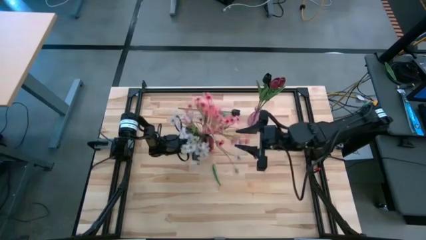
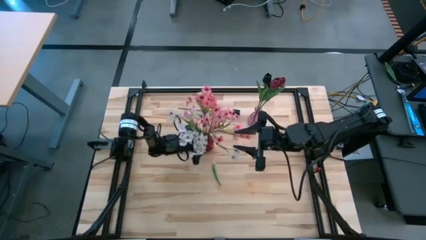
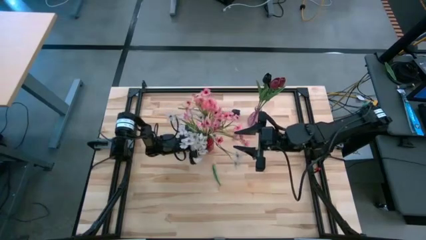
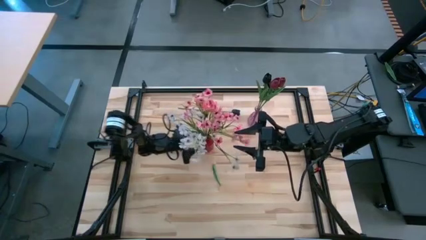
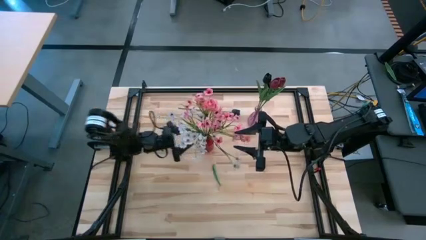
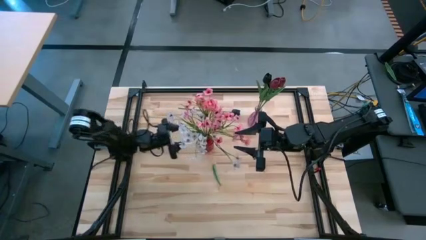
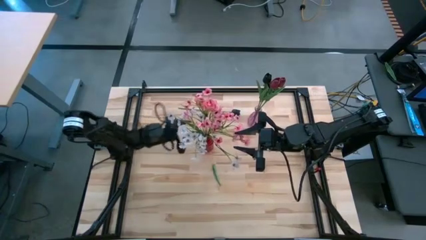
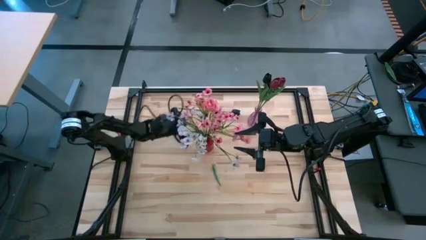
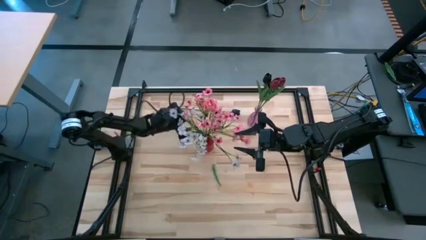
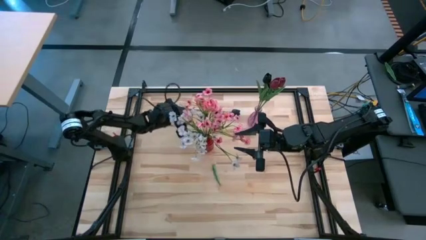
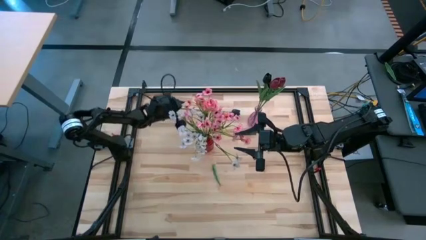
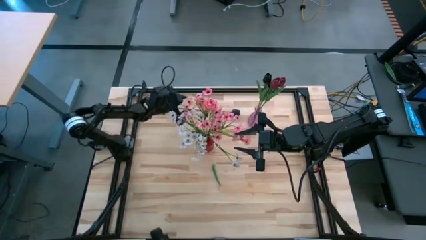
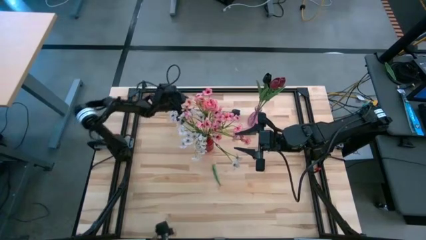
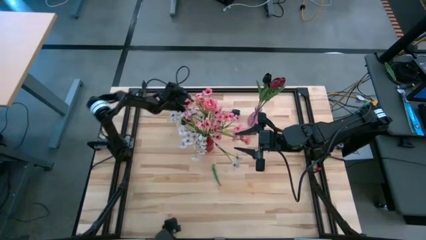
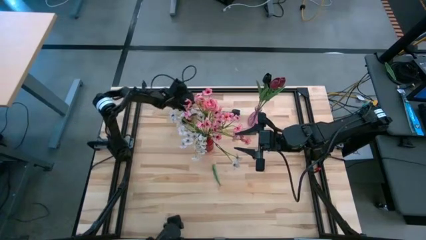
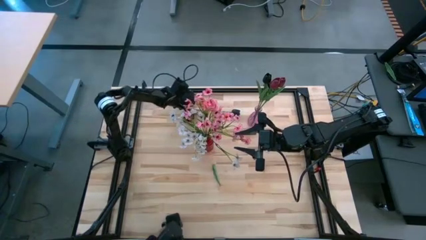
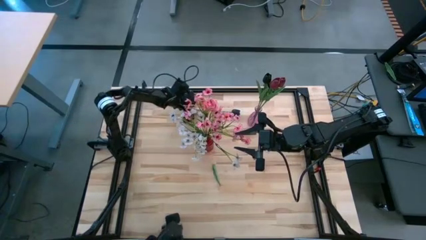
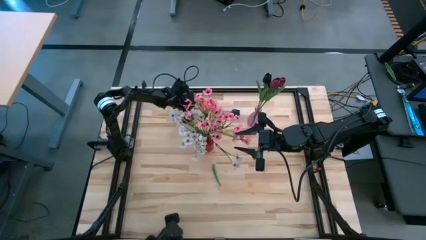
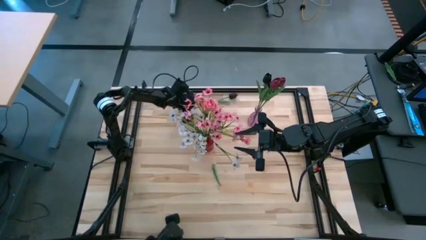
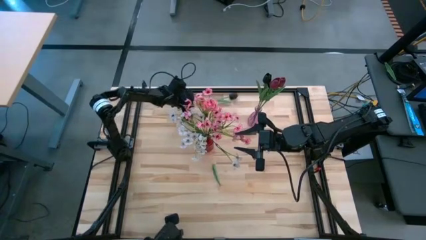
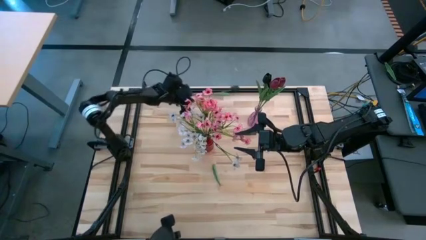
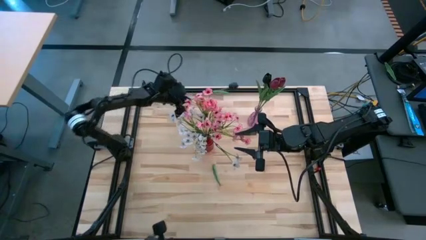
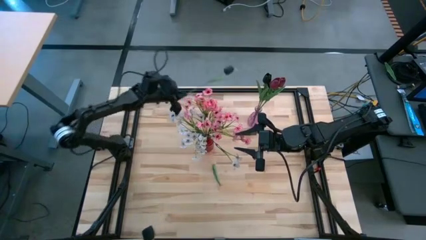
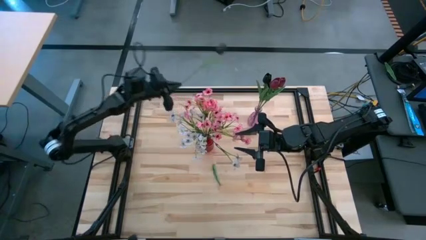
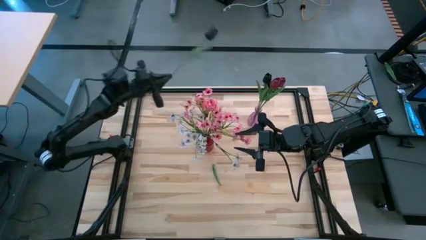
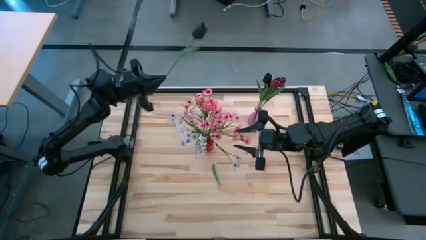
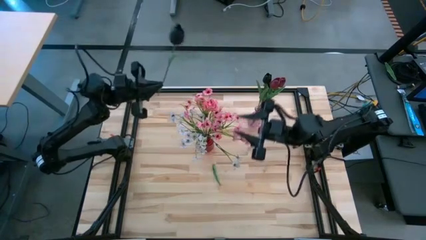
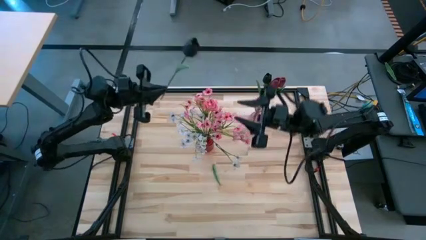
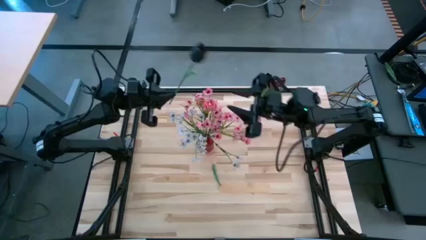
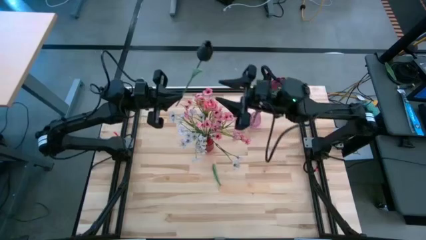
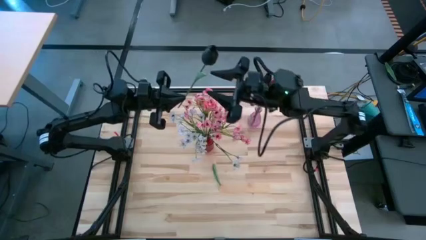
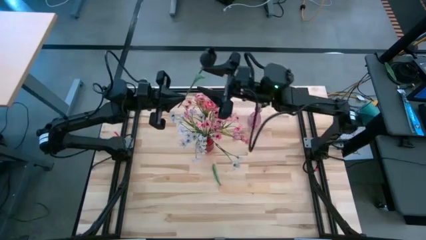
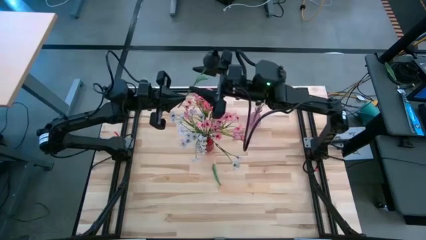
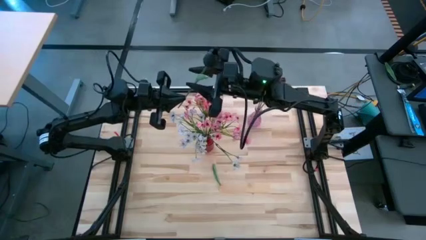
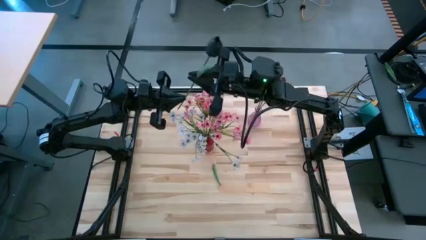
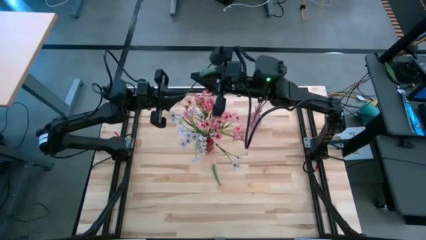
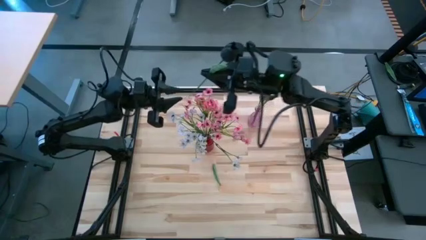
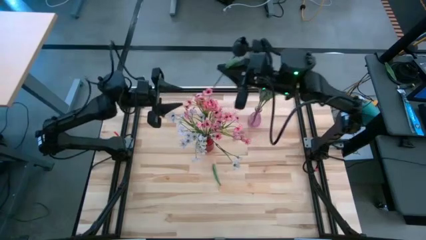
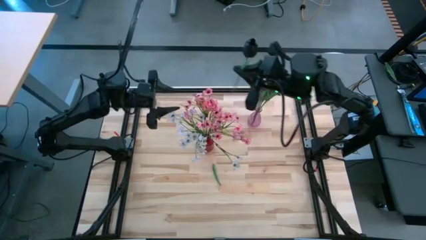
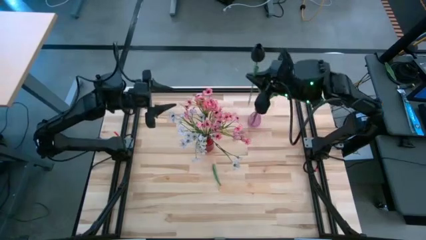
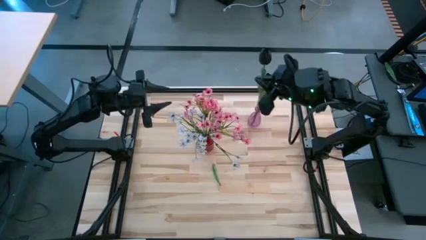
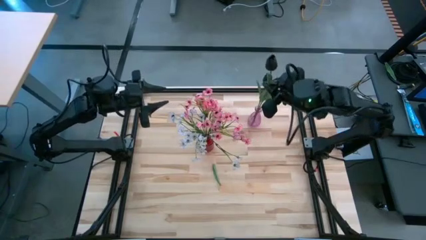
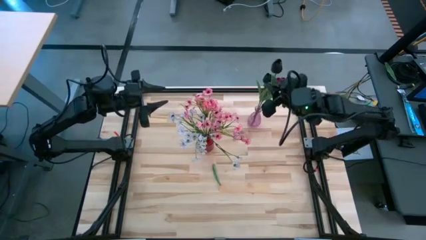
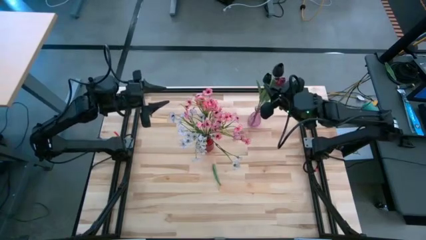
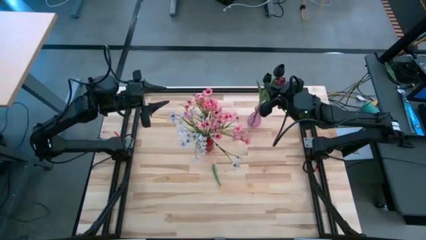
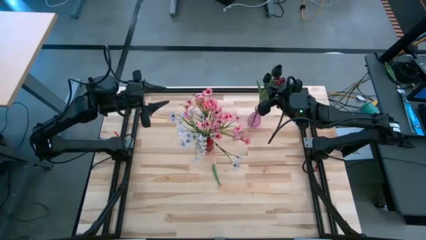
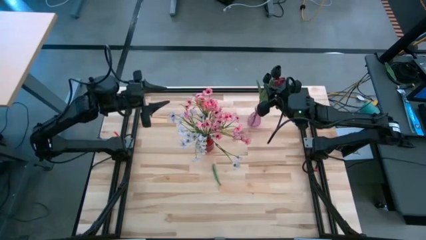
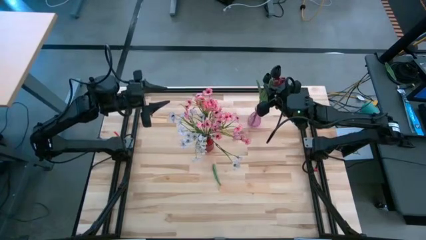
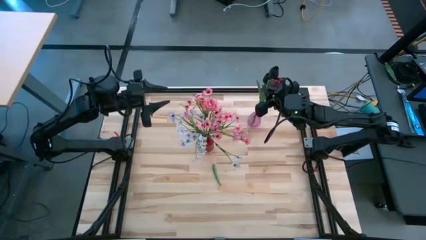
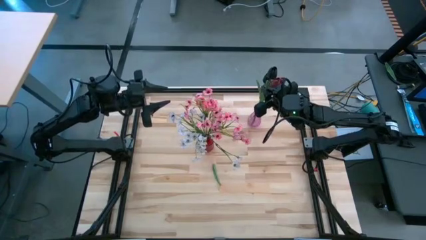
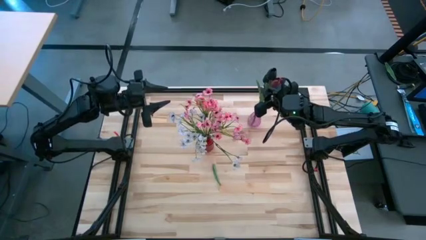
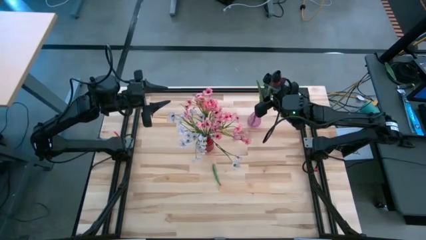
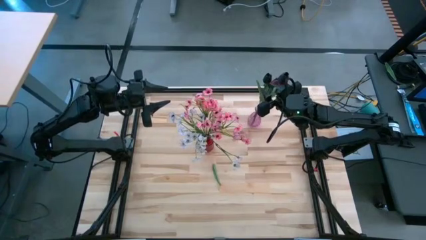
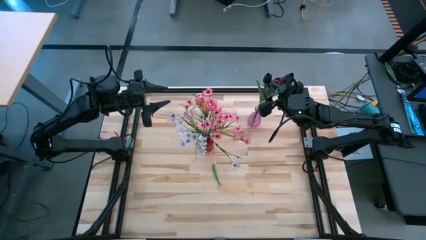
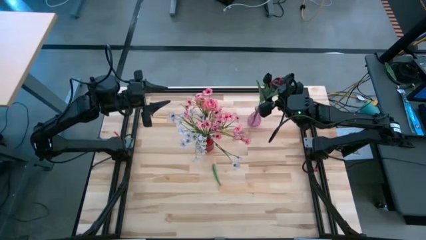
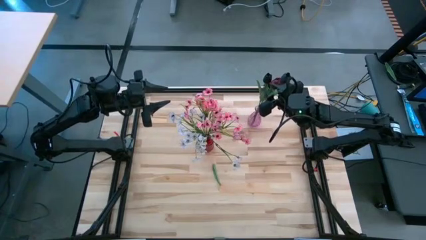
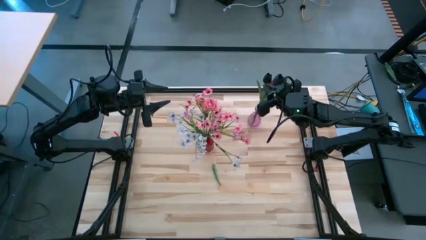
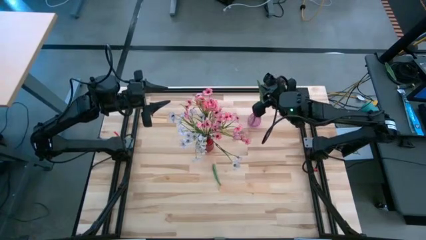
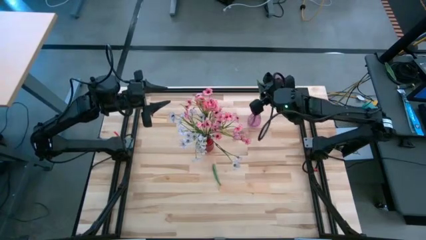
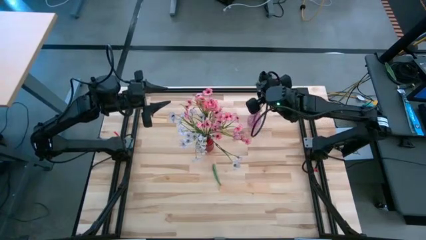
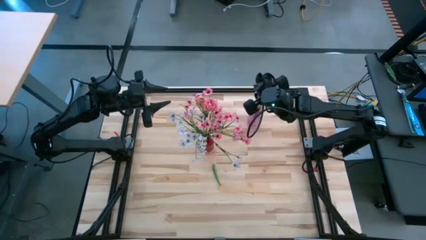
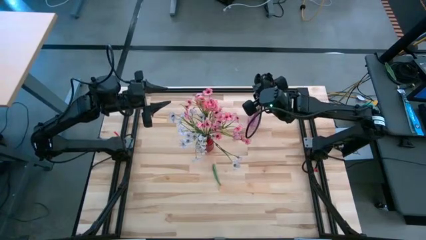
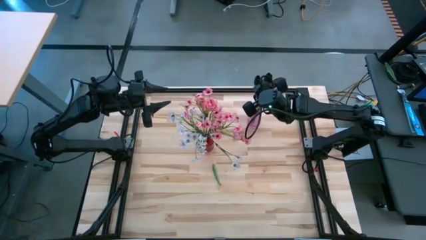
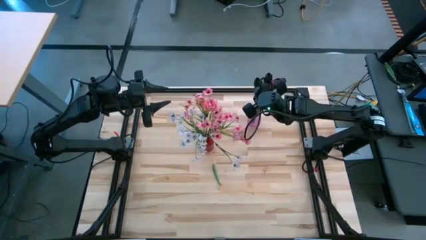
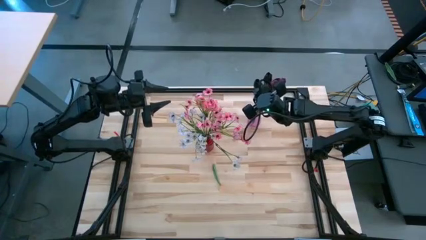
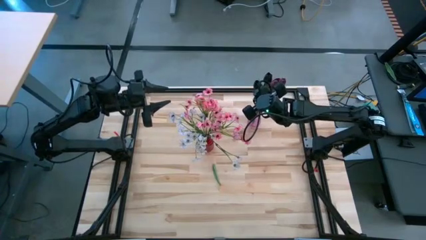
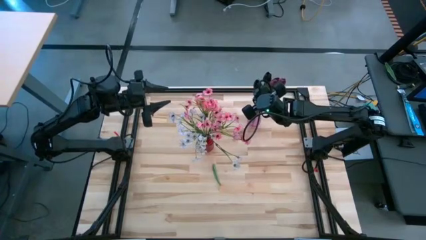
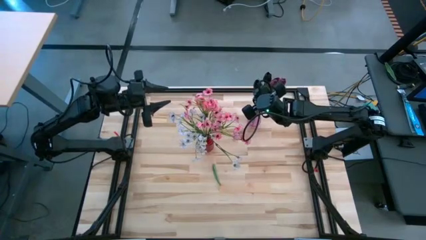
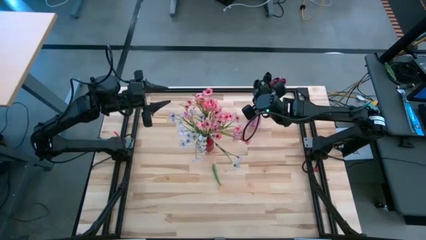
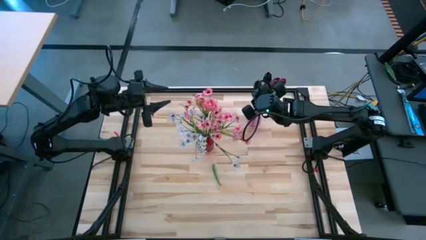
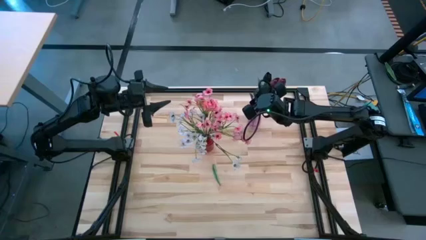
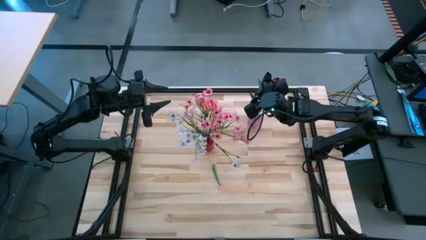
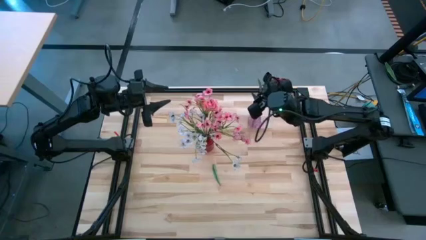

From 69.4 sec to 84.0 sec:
Task: Sort flowers into vase by color
Put the black tulip into the violet vase

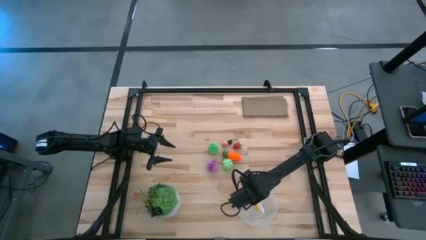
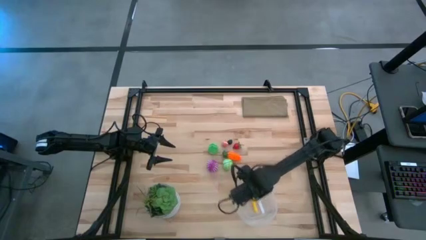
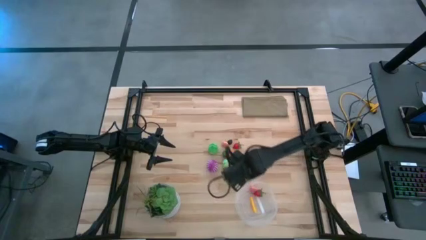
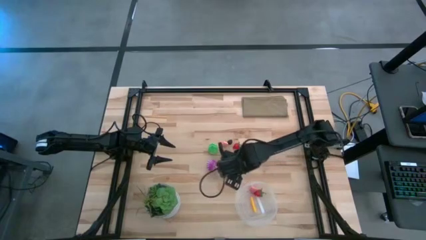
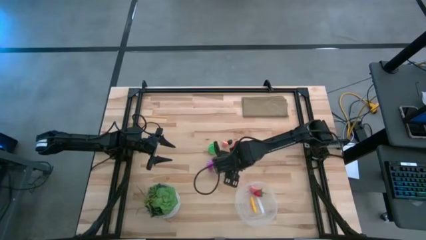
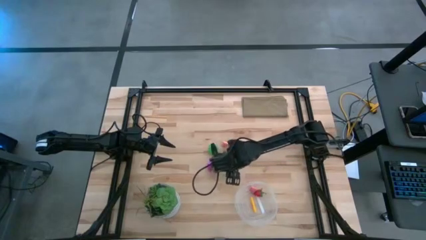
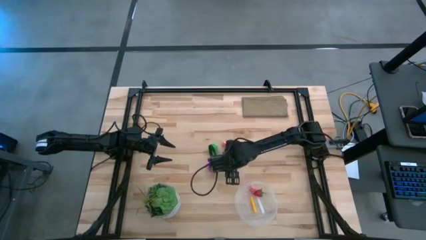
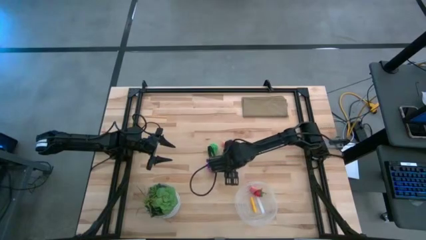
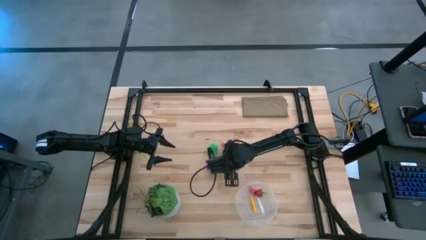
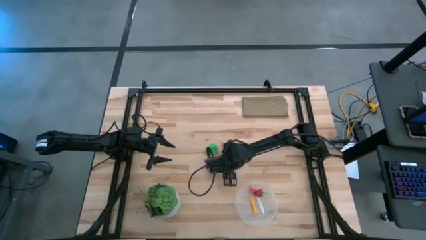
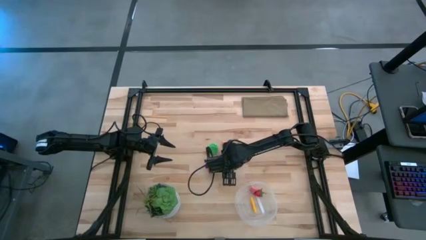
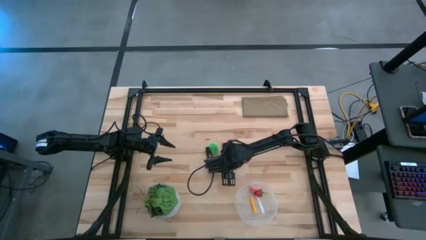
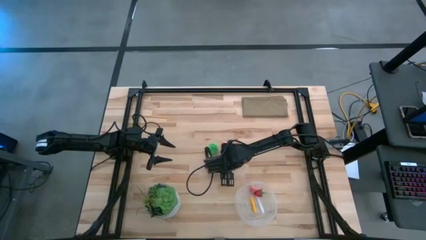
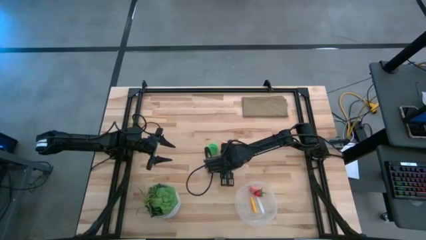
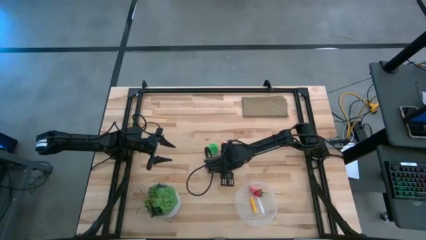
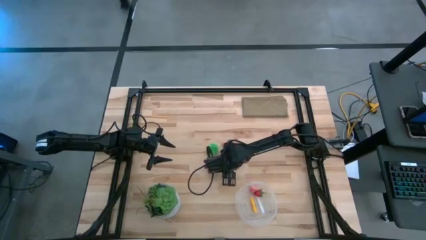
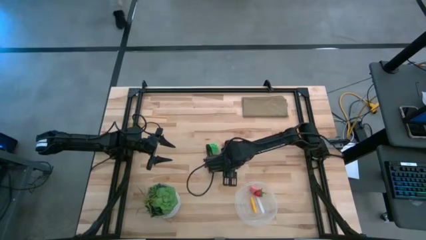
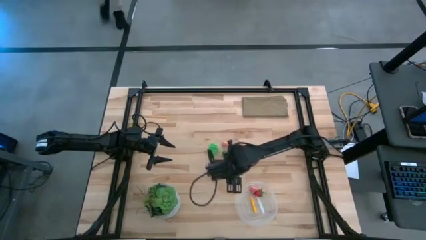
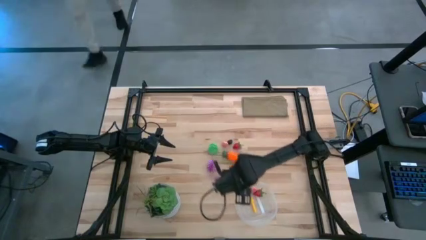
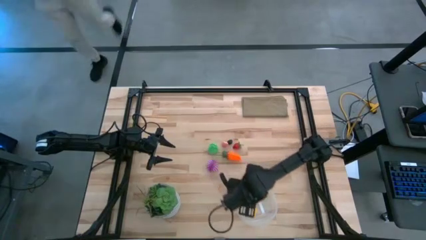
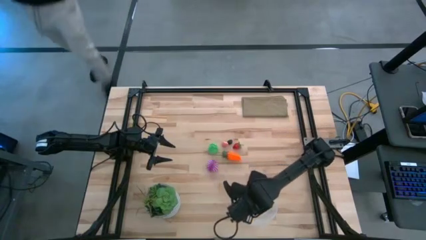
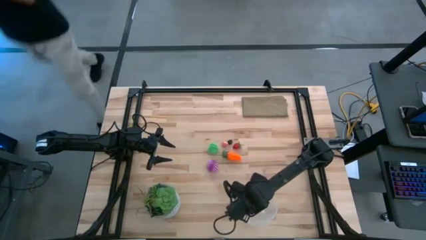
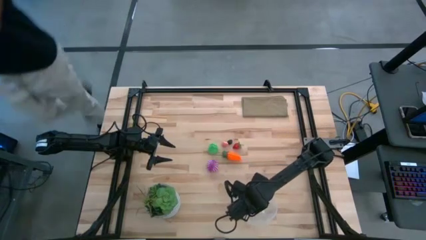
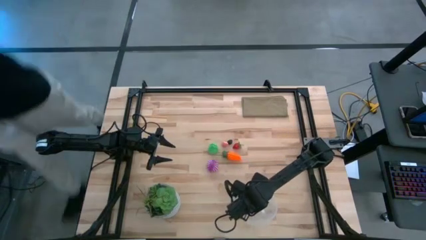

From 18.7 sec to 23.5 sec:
Task: Pick and placing Produce into tupperware
Put the green cabbage into the transparent container
